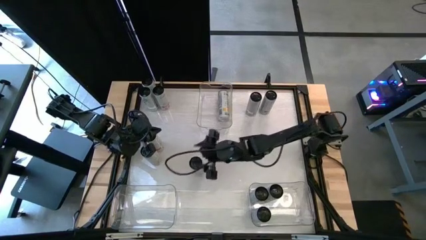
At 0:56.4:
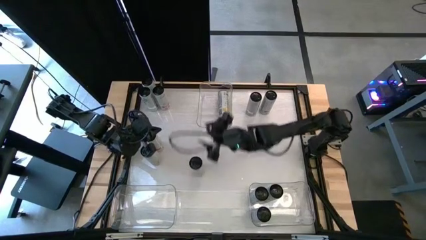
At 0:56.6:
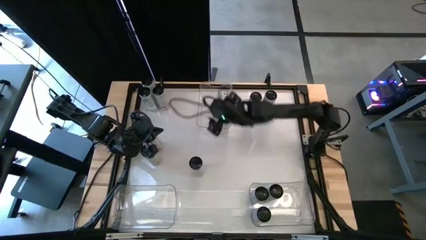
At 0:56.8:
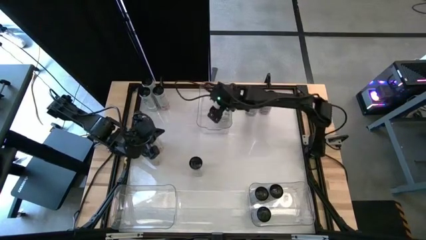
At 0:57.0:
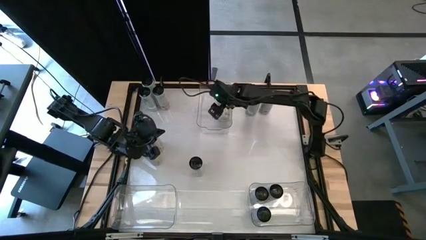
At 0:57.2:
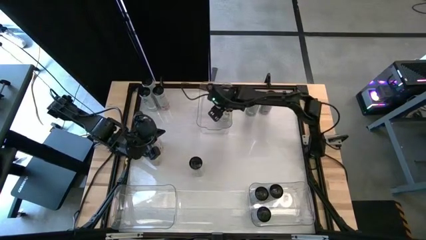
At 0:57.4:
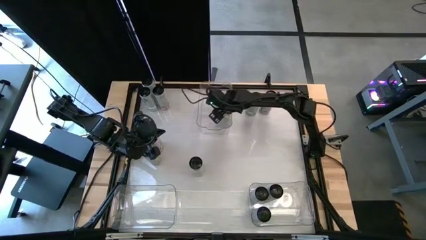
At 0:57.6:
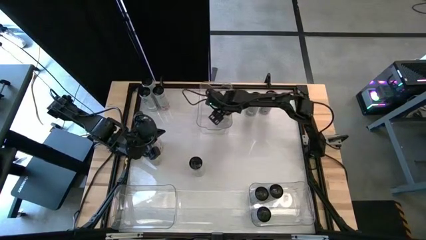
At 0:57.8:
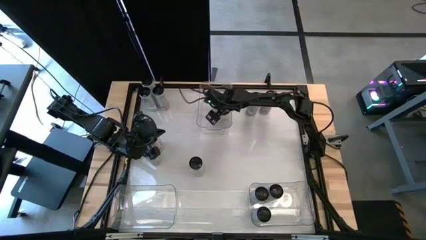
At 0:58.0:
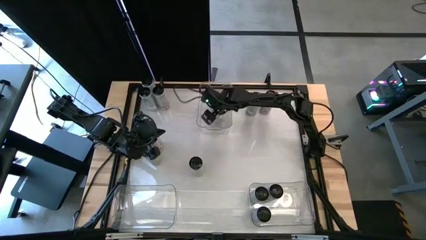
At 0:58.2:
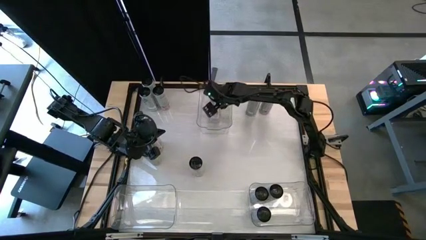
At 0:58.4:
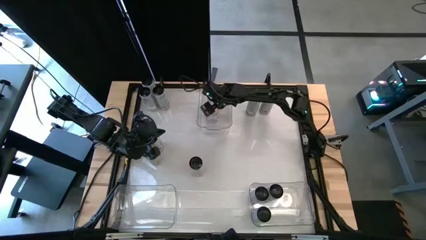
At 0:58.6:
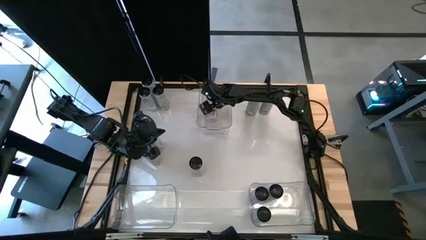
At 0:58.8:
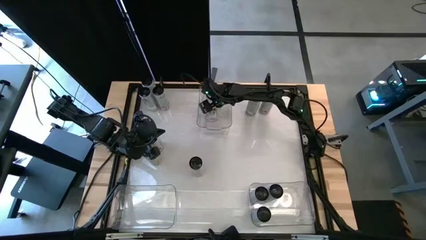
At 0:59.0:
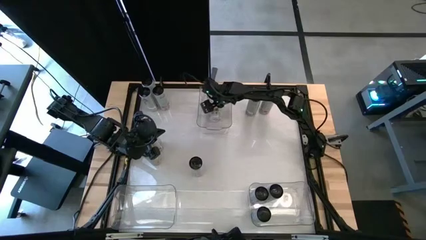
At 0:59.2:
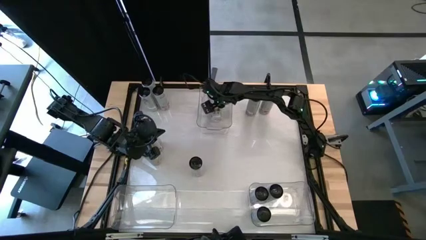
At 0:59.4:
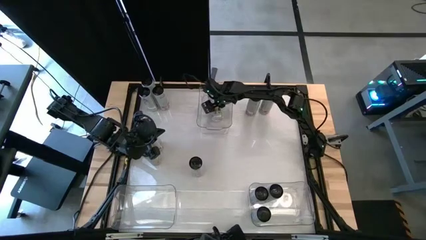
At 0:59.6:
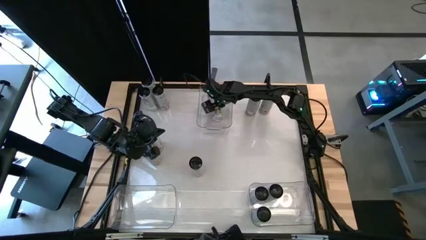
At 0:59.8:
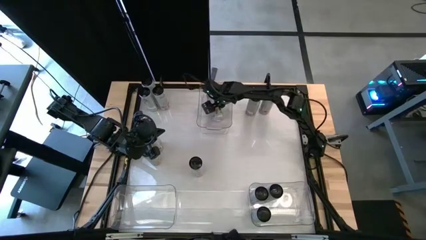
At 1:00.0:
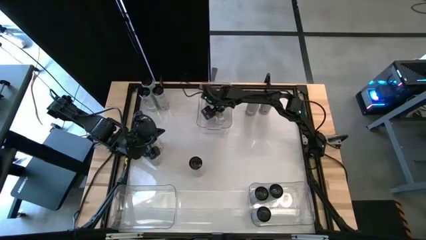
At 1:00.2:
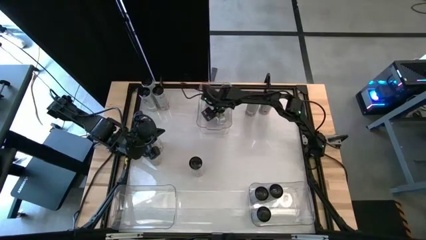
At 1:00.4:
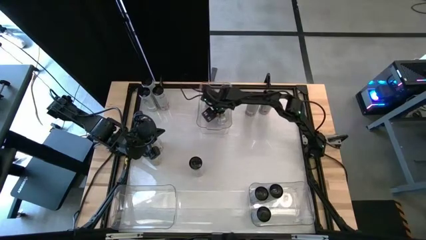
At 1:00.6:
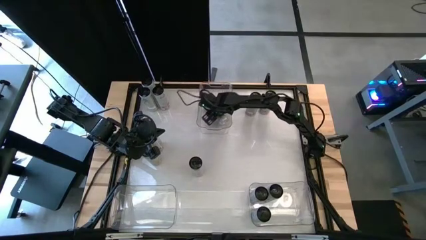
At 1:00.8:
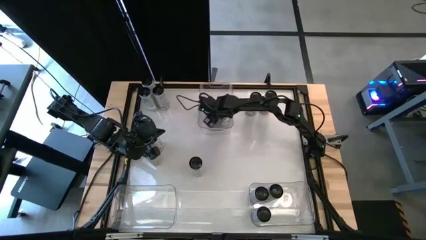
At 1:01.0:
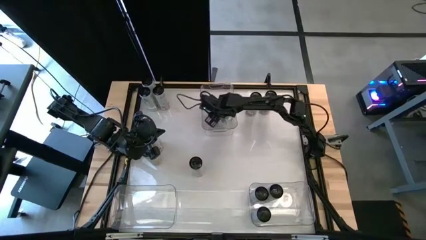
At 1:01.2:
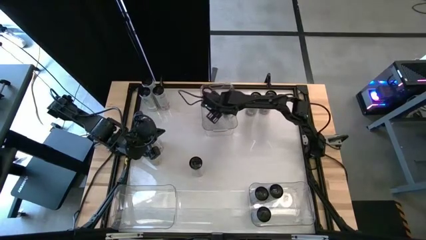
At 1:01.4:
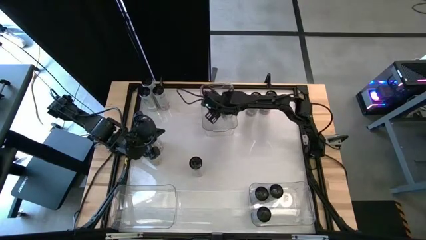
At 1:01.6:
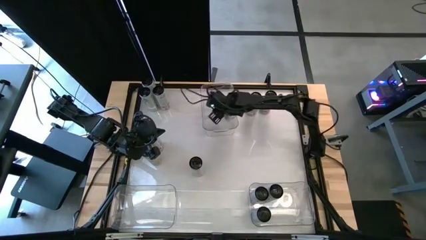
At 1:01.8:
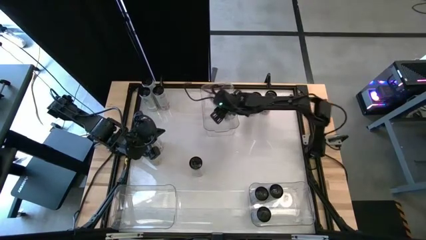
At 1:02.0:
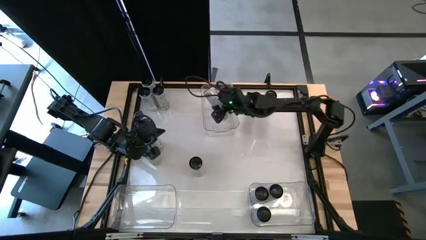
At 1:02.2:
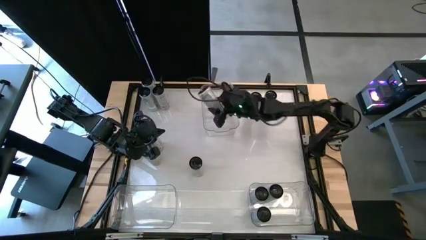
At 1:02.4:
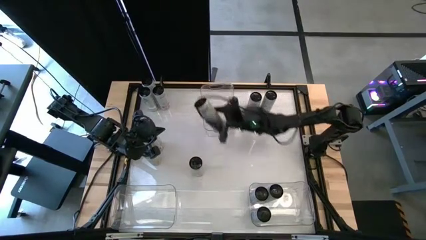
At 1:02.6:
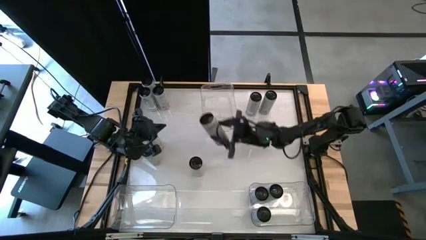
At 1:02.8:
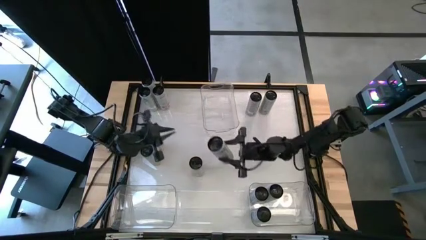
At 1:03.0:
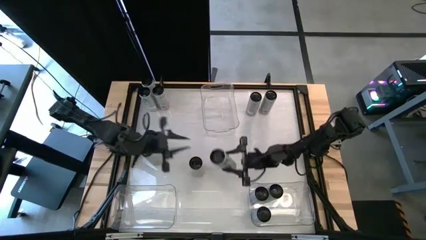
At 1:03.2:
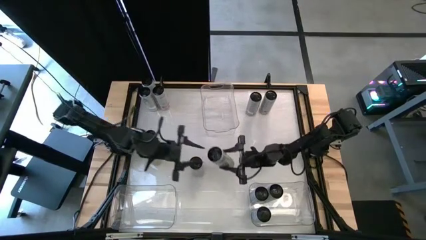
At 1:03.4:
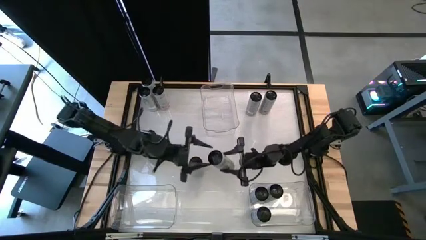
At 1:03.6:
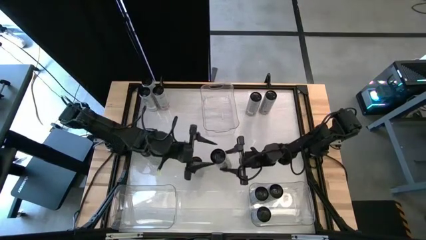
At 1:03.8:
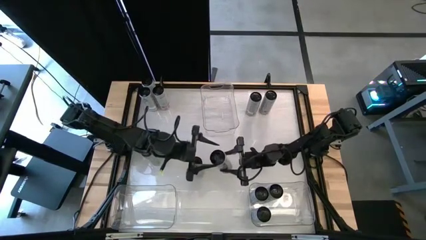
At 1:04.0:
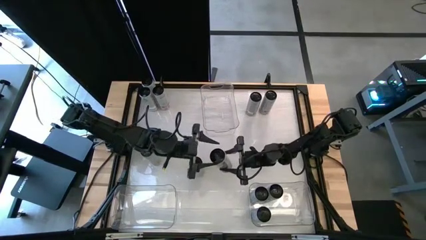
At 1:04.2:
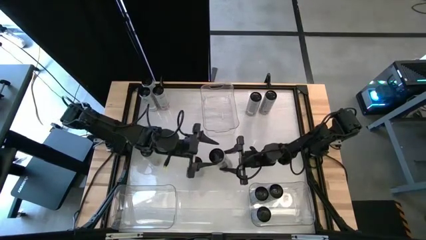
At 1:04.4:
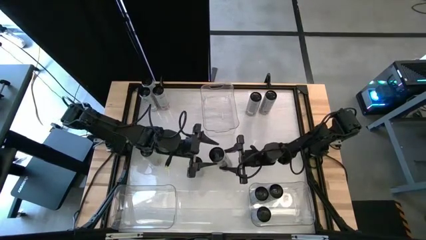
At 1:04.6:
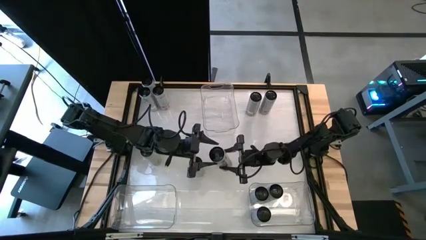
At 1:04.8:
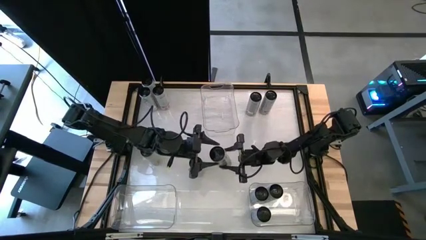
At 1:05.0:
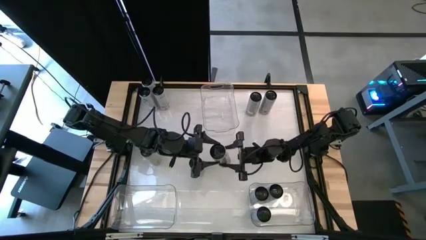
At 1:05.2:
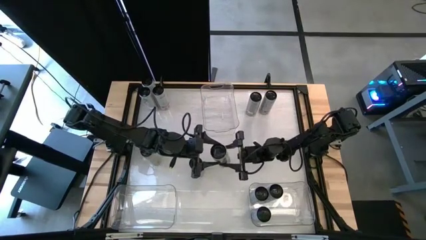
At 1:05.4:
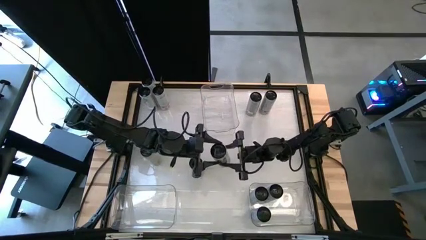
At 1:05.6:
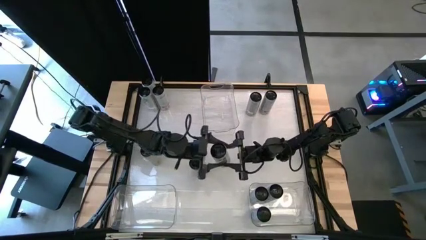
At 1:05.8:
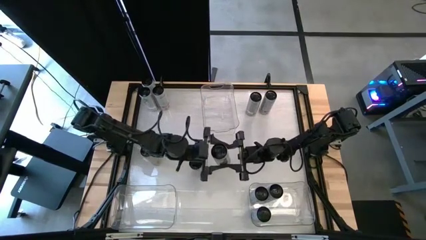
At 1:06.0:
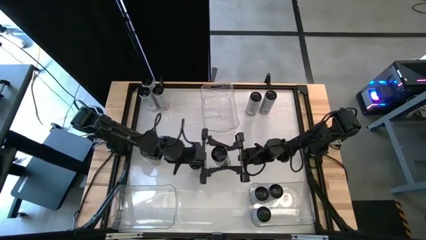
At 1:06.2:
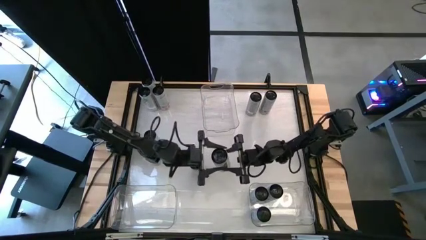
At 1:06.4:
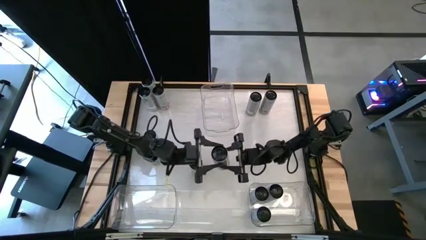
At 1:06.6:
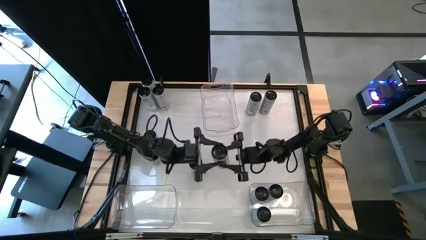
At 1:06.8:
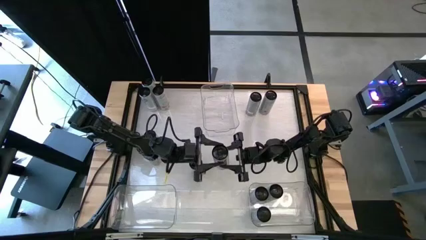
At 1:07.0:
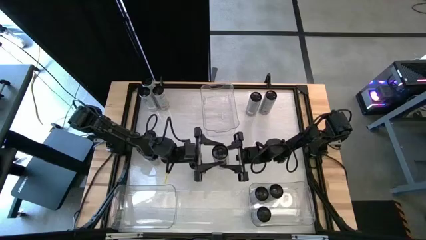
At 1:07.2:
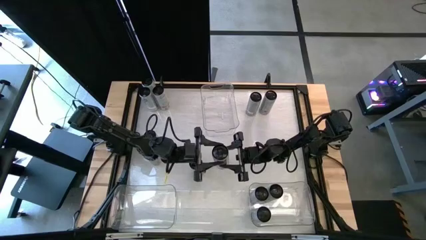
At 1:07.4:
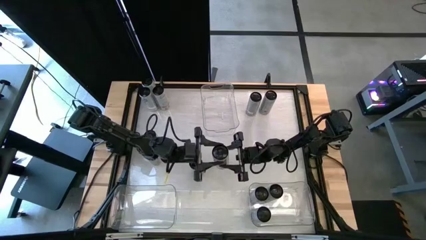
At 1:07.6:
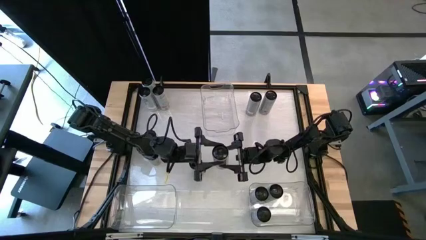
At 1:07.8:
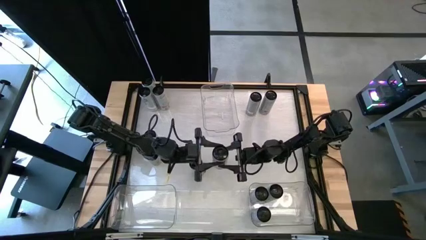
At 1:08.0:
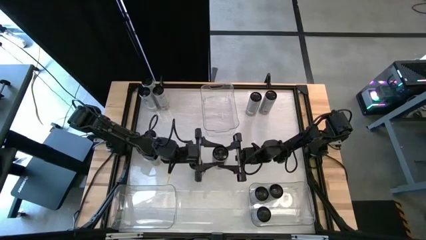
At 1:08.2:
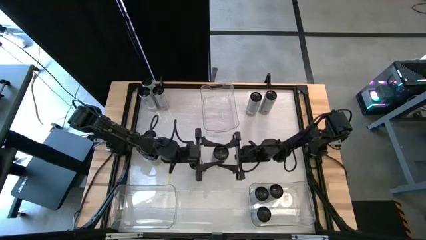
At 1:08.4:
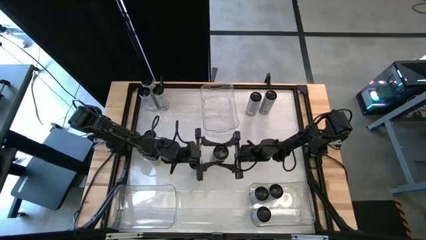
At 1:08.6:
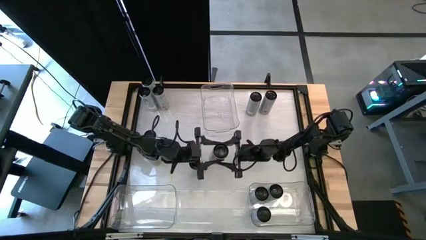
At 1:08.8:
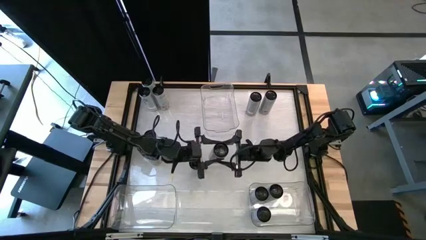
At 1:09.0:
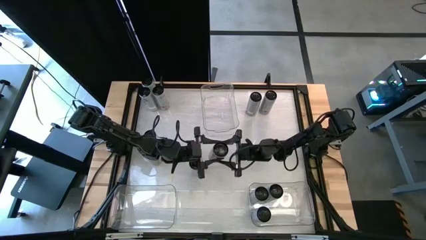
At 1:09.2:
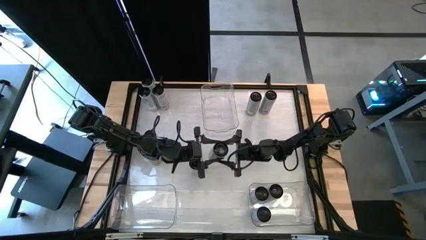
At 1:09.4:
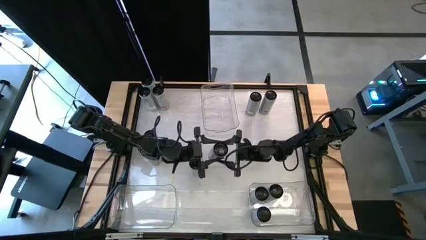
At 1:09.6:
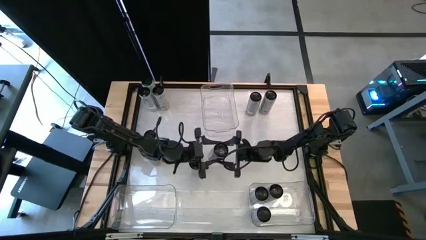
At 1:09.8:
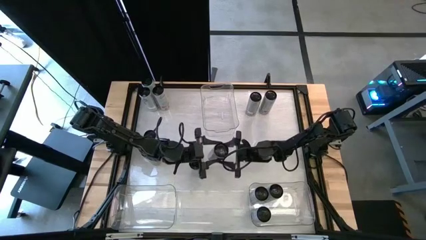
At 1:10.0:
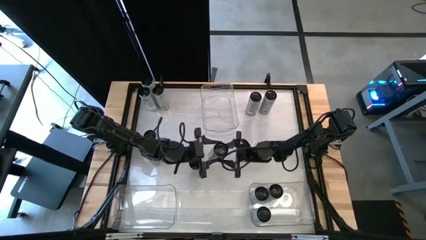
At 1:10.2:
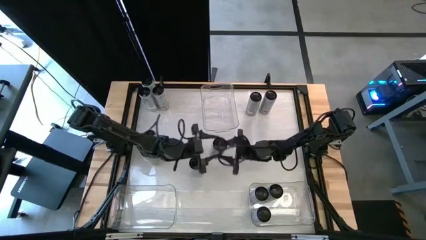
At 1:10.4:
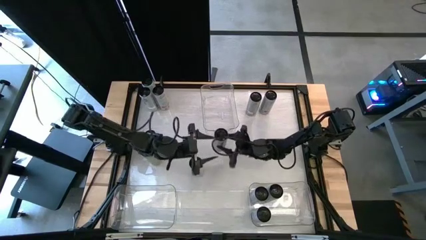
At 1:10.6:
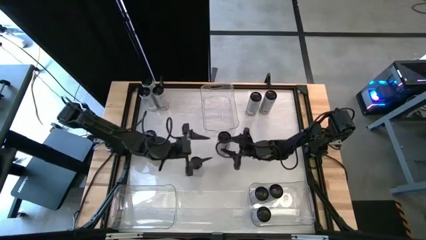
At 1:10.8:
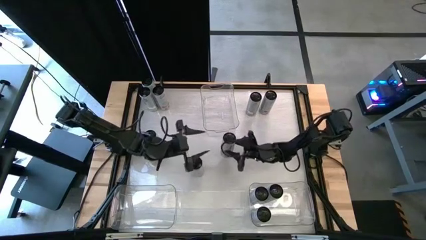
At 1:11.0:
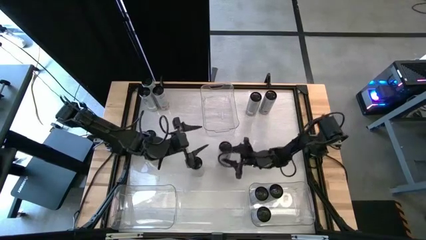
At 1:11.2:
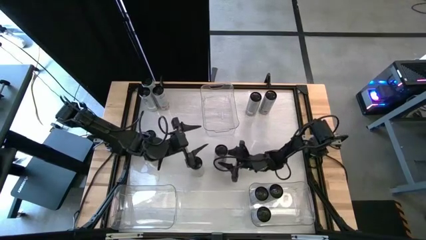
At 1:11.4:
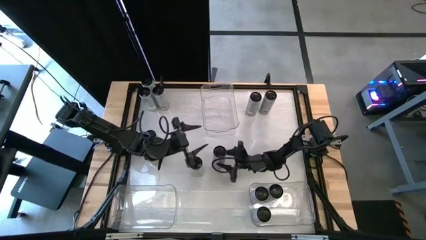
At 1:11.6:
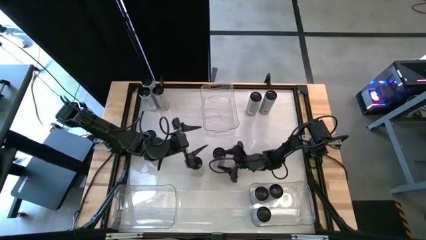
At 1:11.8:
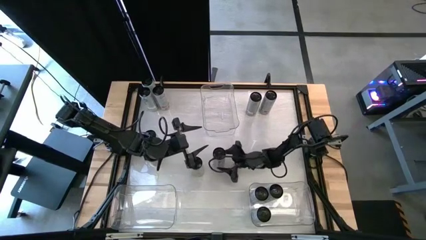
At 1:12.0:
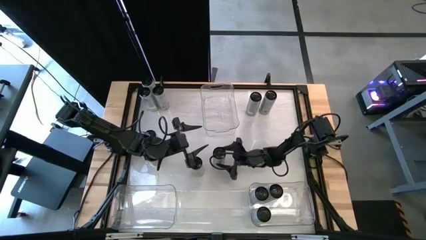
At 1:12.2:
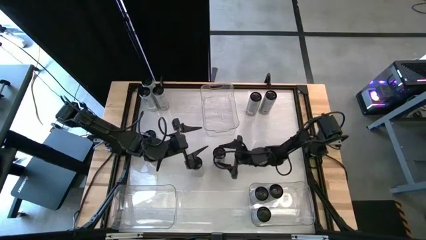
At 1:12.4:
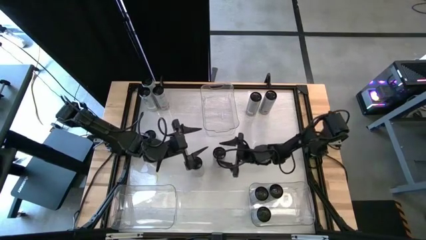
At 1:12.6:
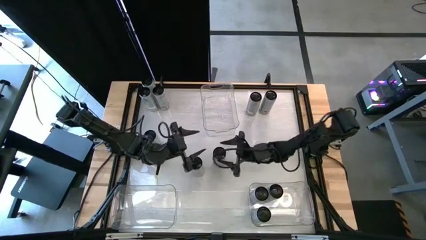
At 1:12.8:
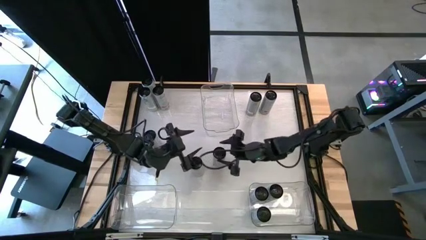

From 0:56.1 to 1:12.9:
Task: Sort soda cans
Remove white yellow soda can from the top middle transparent bin
